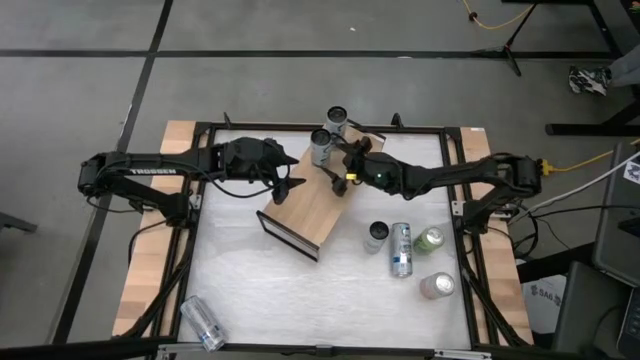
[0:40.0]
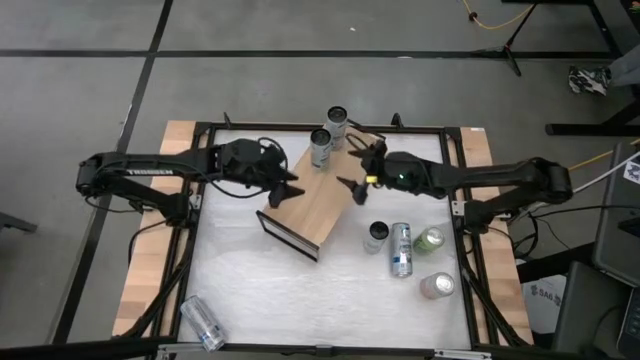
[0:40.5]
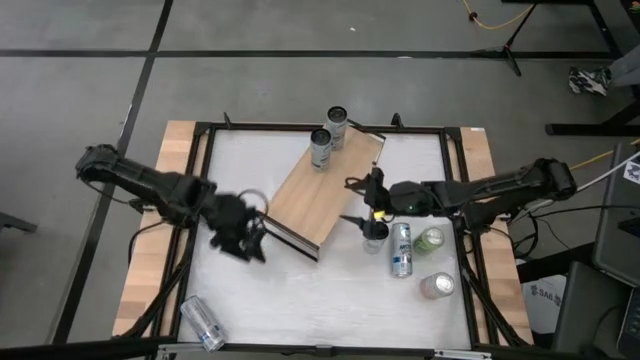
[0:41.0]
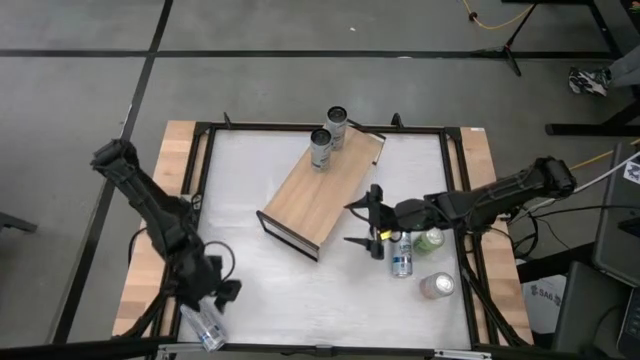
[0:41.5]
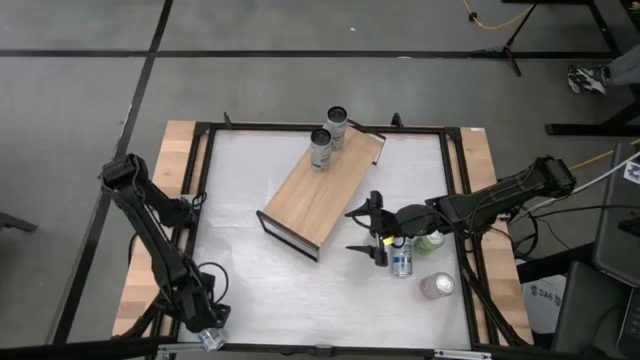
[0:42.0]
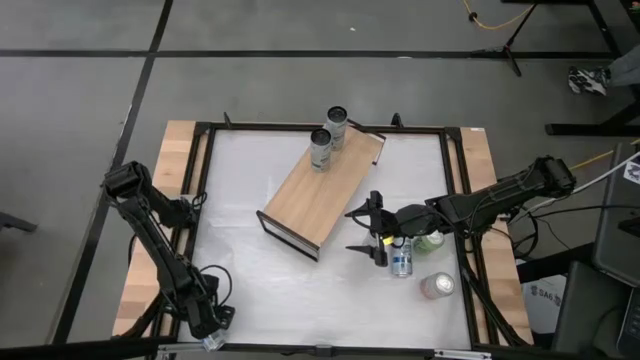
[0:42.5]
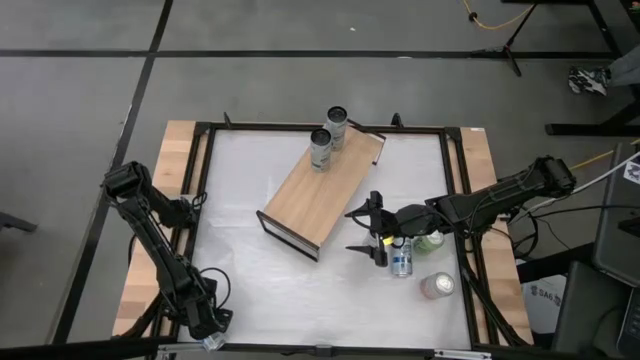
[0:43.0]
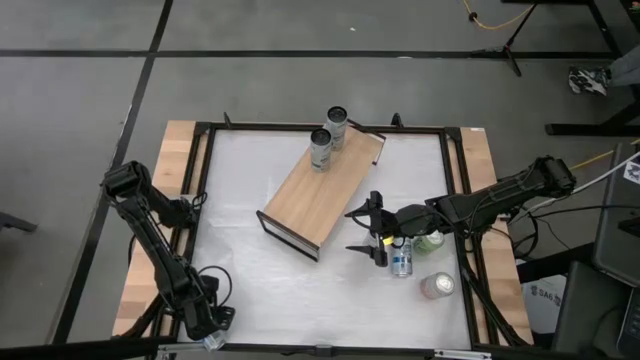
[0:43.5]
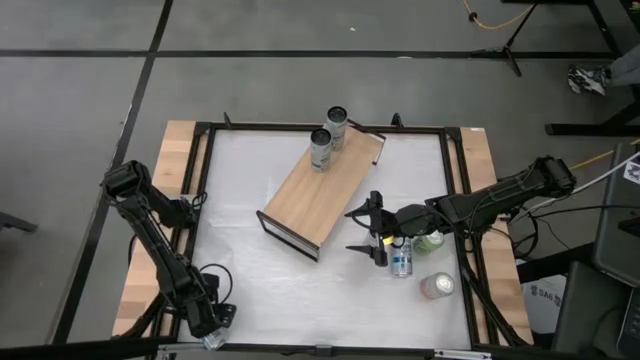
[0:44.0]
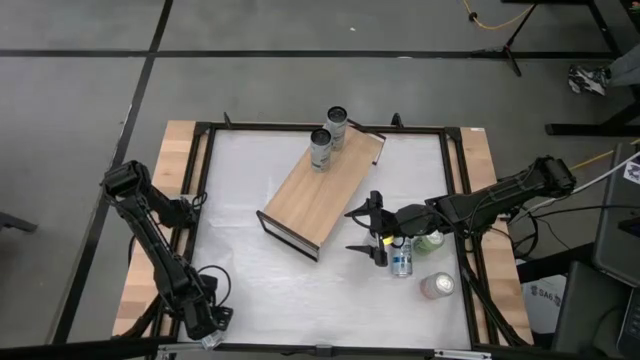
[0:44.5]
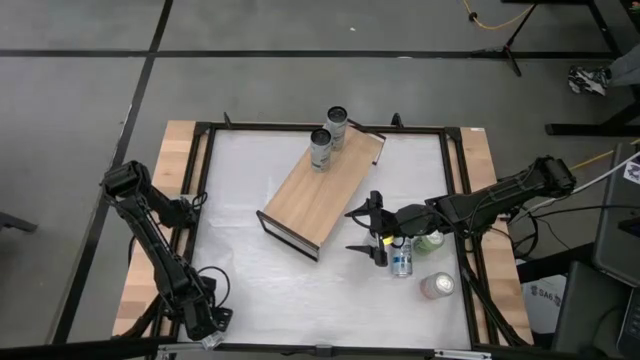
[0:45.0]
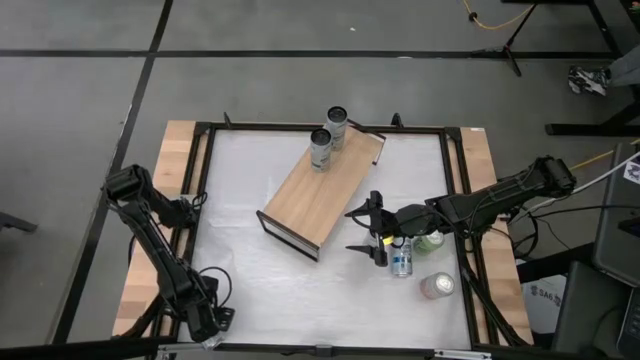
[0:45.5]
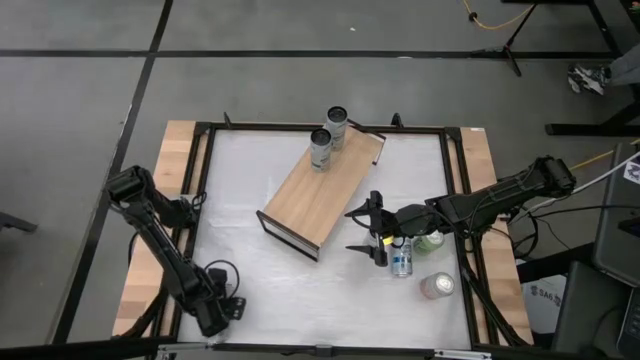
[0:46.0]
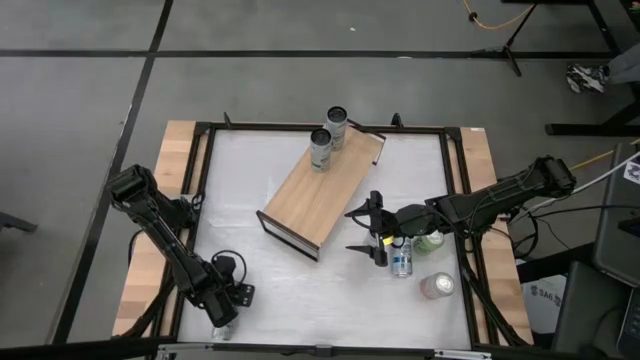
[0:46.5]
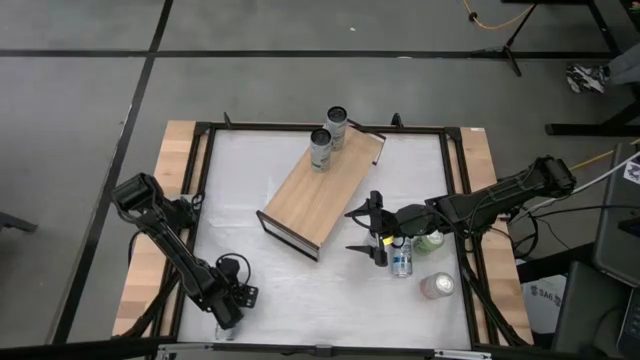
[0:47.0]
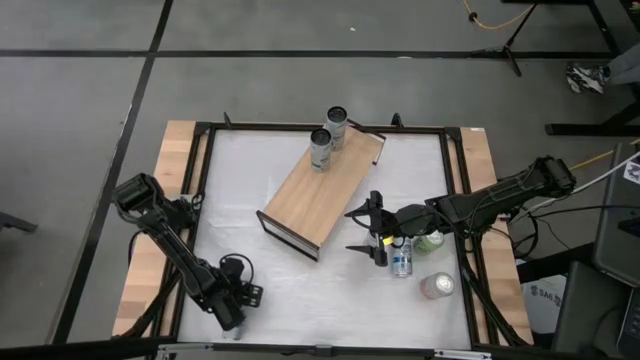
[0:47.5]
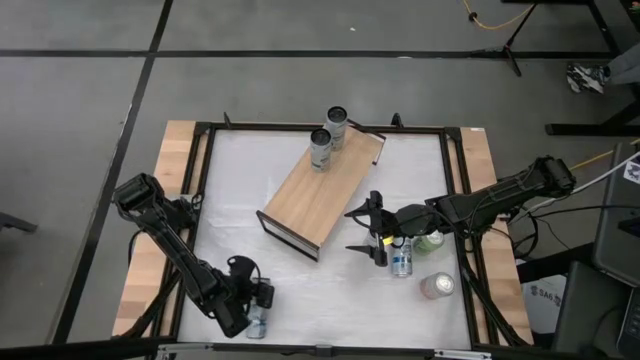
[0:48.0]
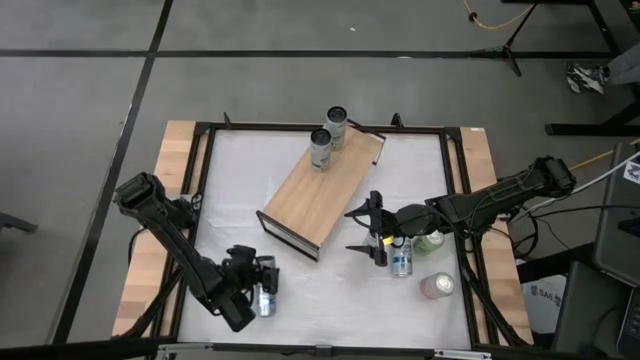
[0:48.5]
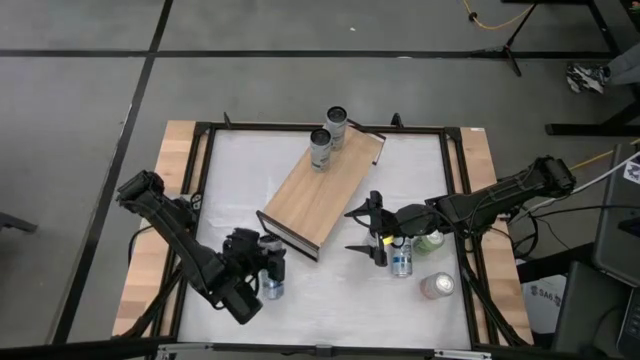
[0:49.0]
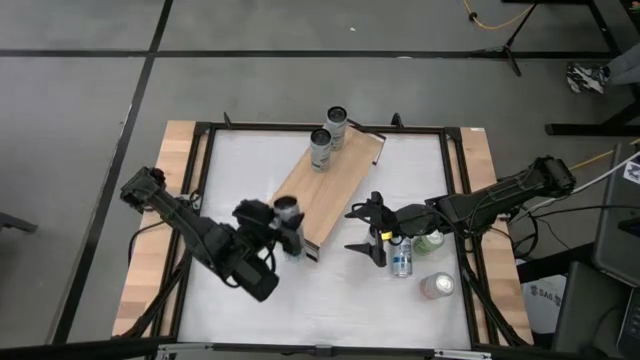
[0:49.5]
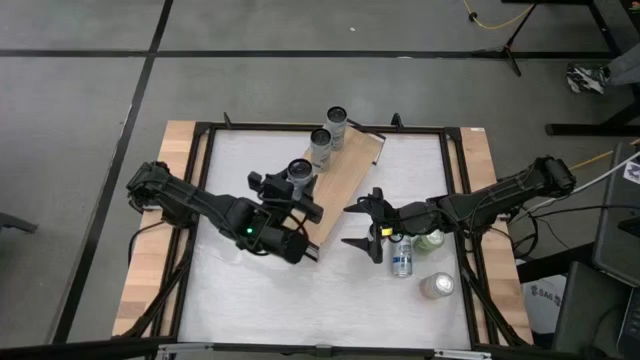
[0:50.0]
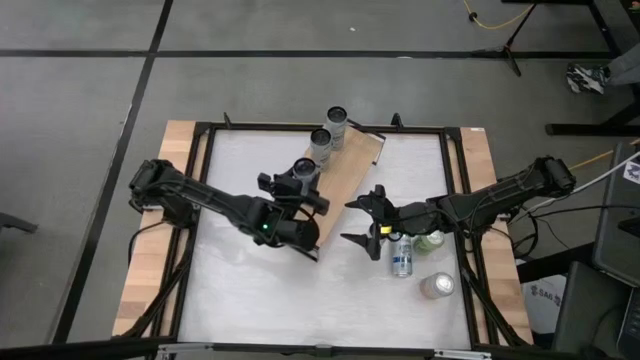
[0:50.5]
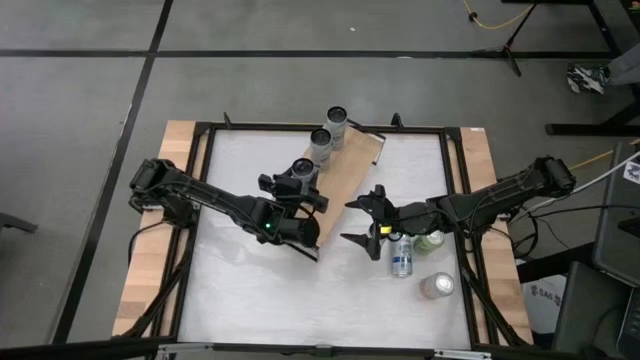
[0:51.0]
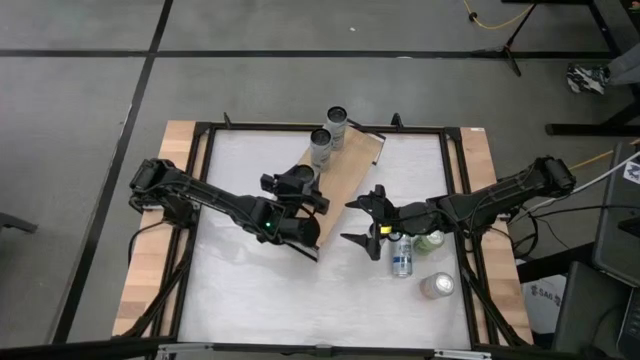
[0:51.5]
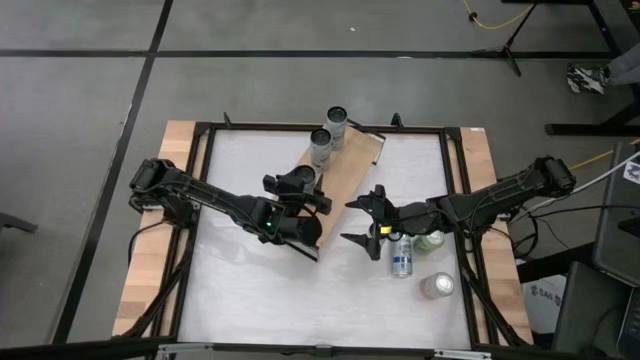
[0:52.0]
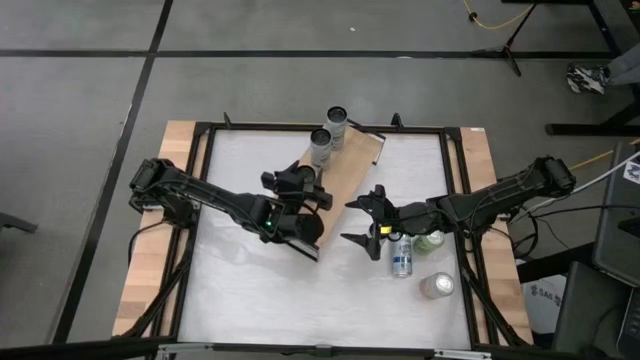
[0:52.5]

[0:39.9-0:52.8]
Task: Place canned beverage on shelf
Put the bottom left white soda can on the shelf

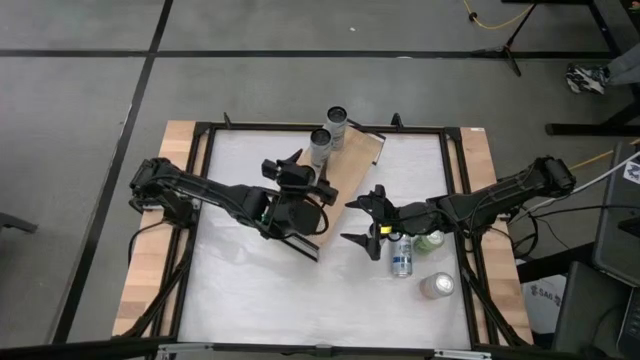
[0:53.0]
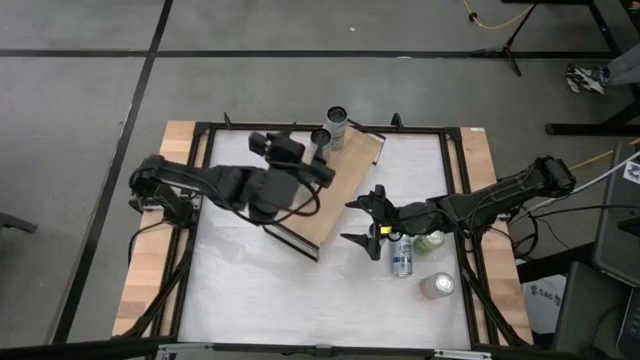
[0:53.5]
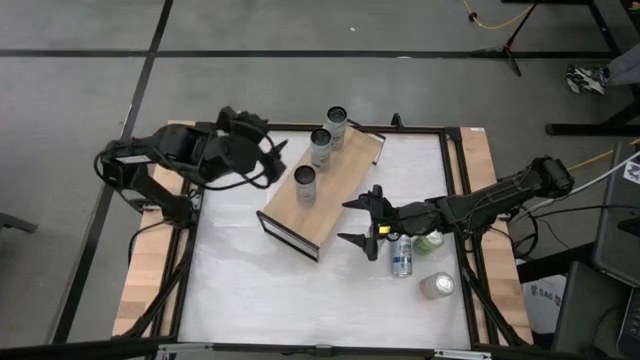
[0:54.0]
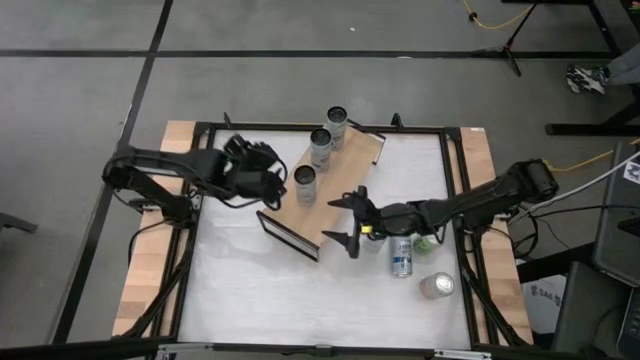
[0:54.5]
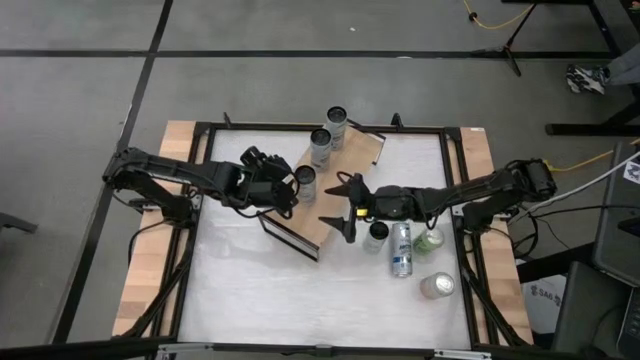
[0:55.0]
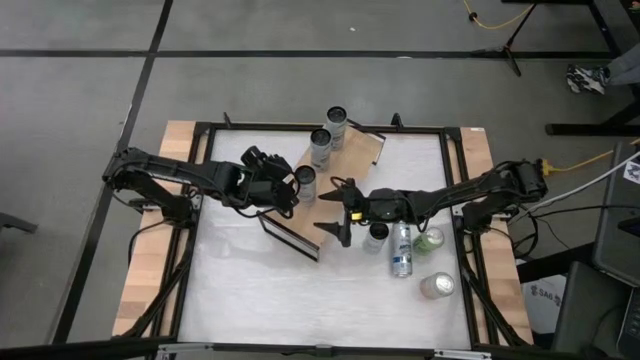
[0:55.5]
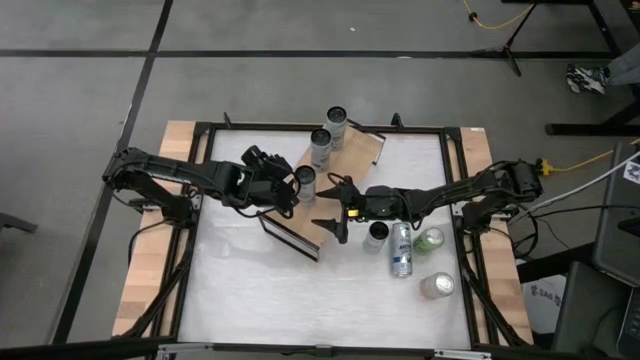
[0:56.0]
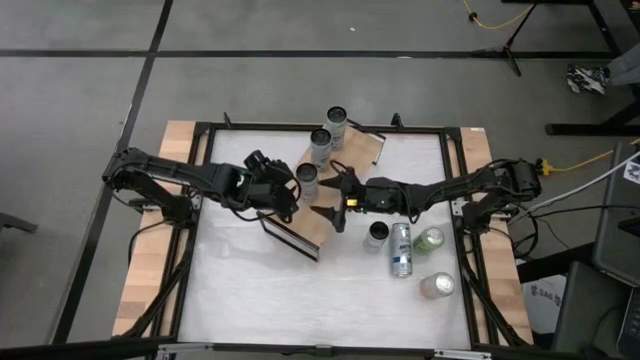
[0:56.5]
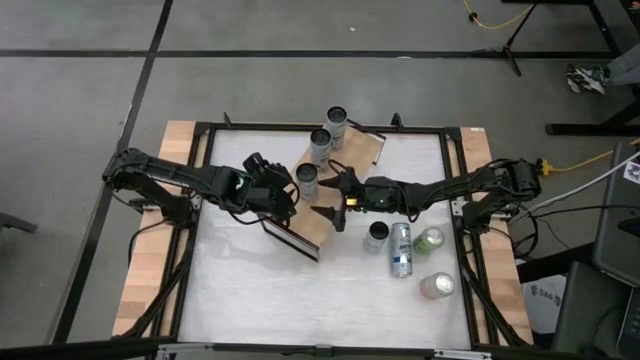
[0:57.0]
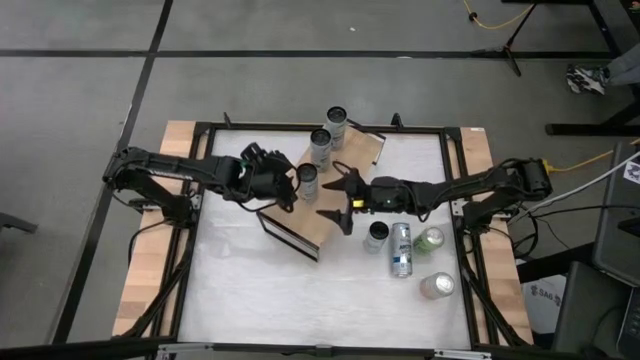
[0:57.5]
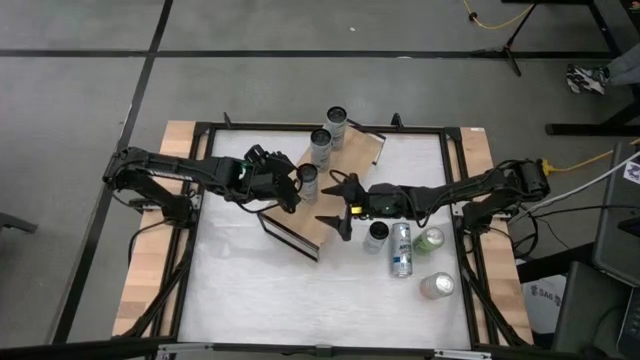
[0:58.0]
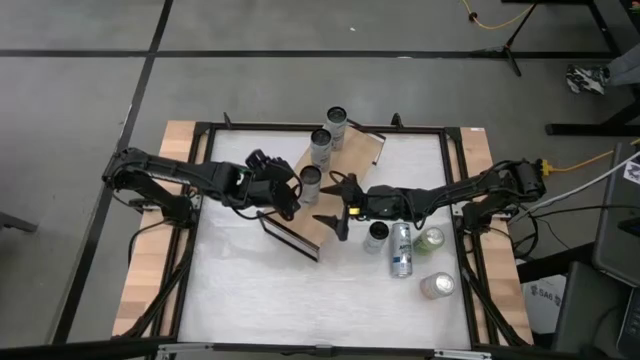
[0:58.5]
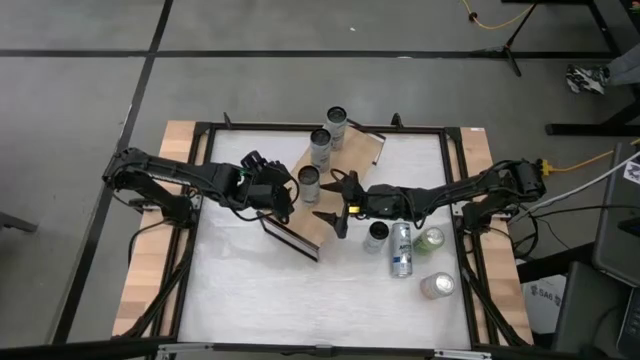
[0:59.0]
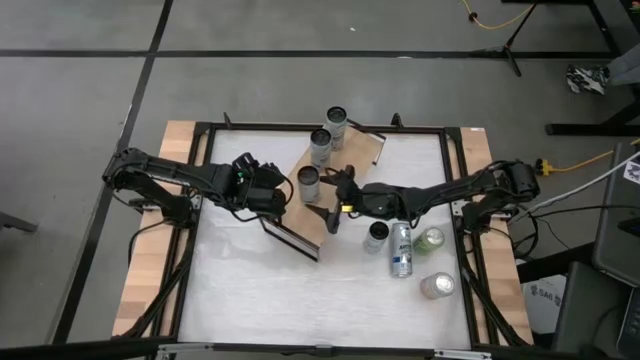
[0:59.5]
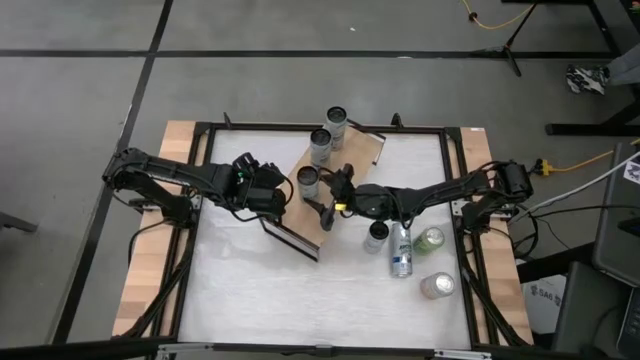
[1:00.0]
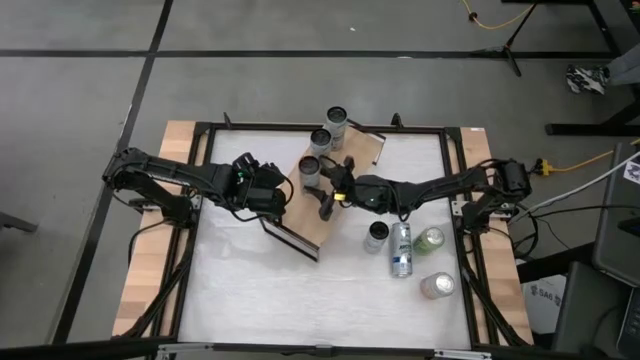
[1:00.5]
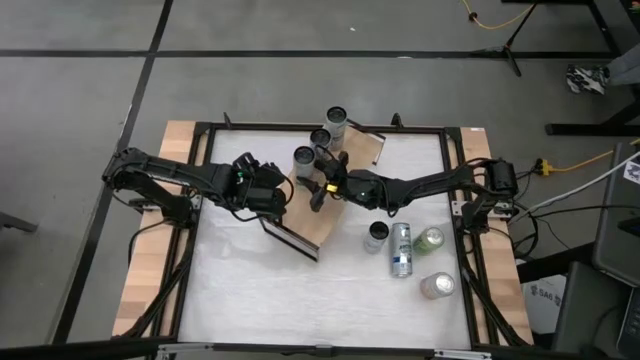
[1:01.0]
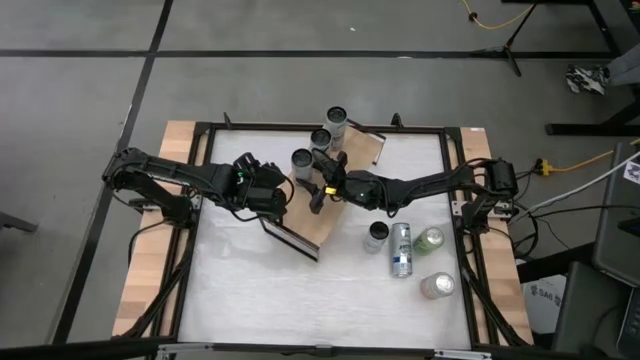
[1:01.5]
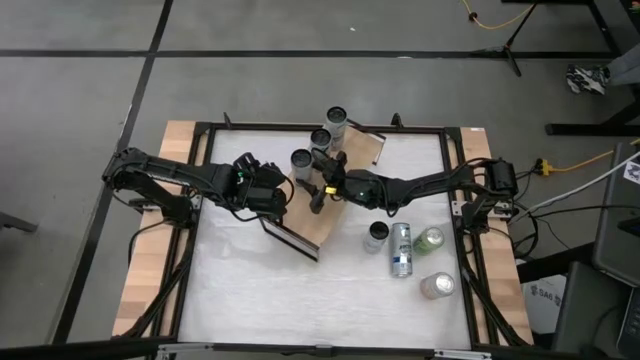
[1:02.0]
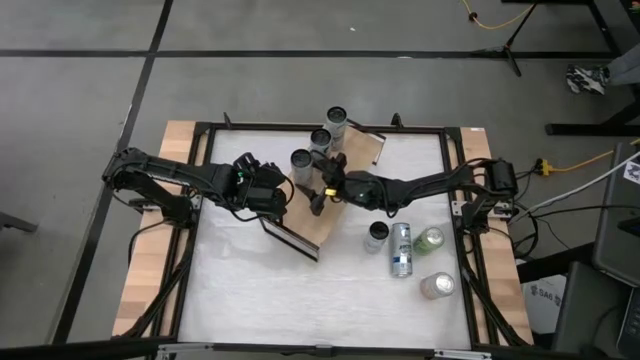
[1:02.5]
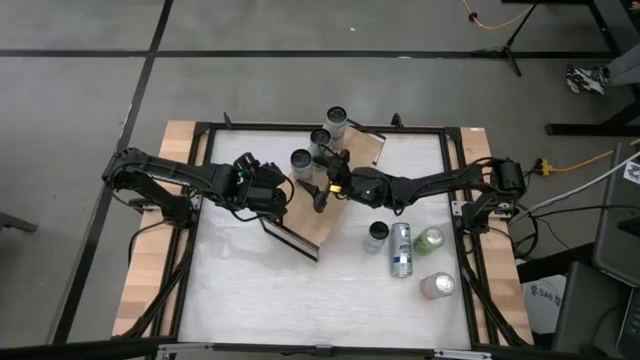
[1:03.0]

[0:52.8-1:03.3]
Adjust the soda cans on the shelf
